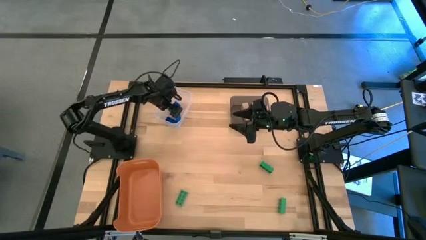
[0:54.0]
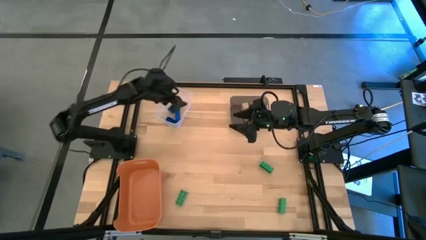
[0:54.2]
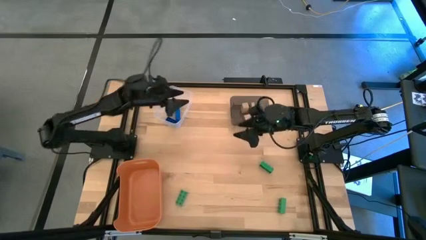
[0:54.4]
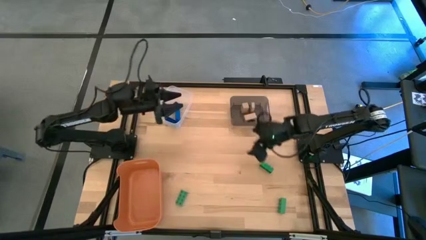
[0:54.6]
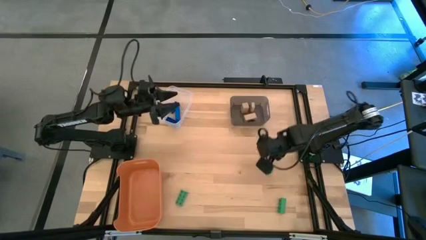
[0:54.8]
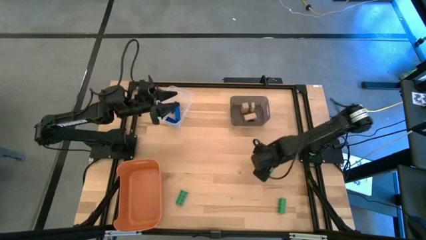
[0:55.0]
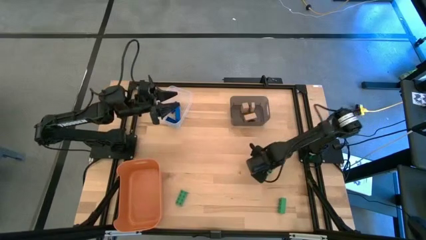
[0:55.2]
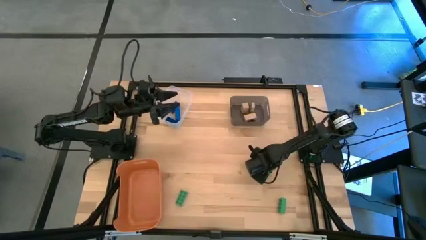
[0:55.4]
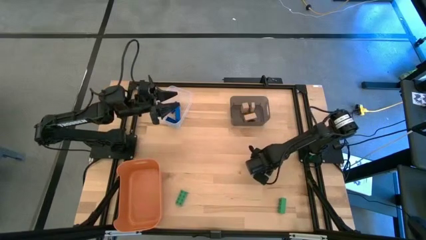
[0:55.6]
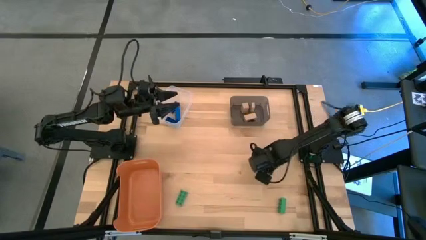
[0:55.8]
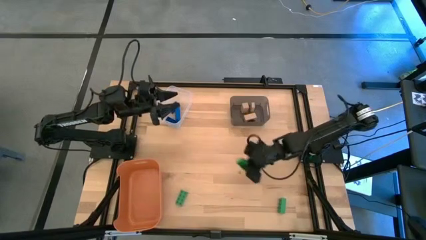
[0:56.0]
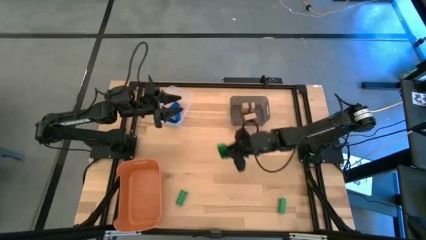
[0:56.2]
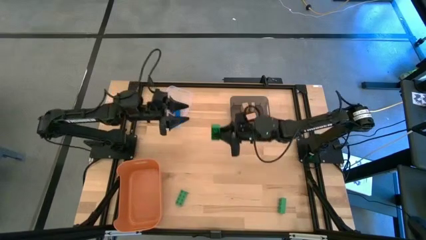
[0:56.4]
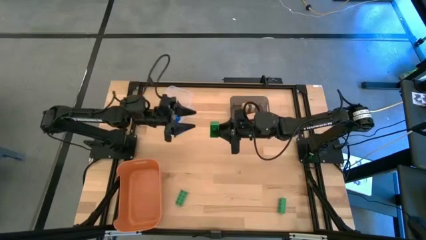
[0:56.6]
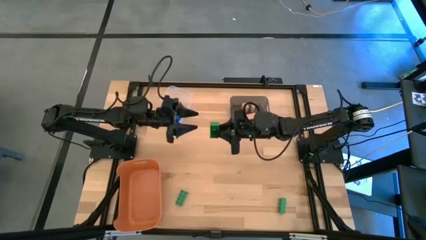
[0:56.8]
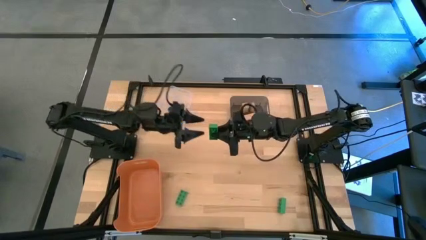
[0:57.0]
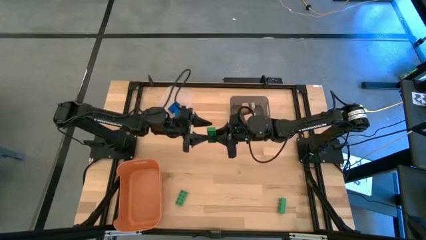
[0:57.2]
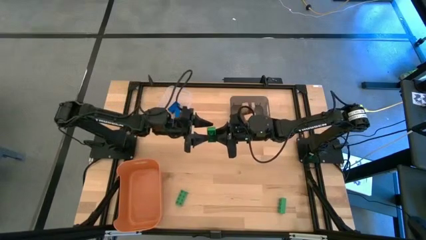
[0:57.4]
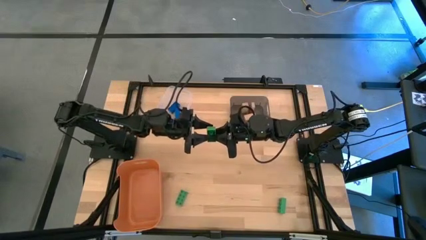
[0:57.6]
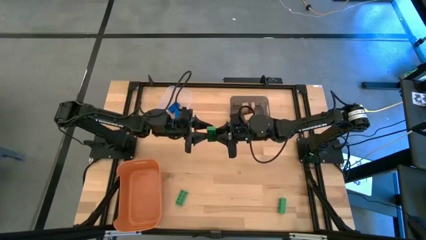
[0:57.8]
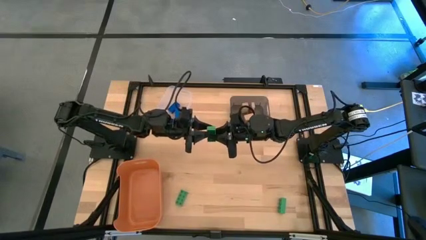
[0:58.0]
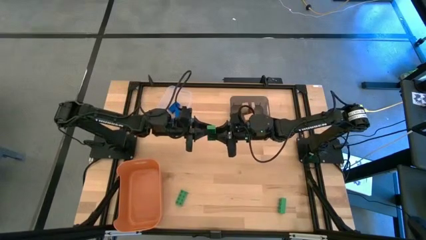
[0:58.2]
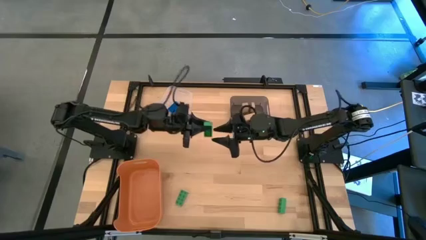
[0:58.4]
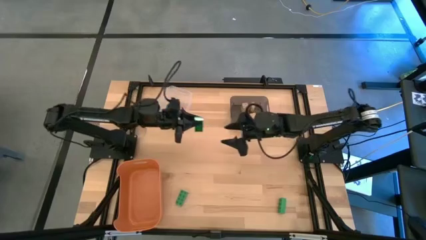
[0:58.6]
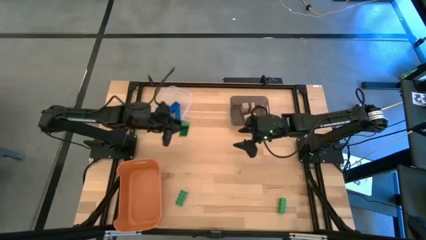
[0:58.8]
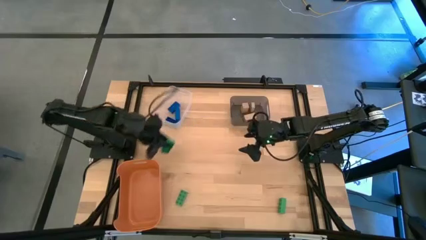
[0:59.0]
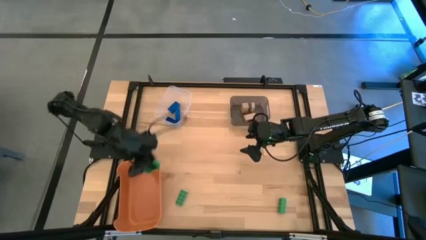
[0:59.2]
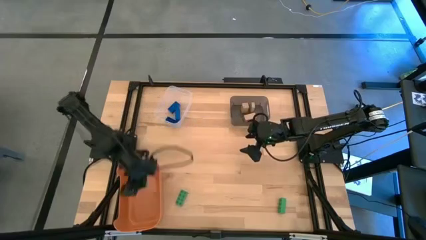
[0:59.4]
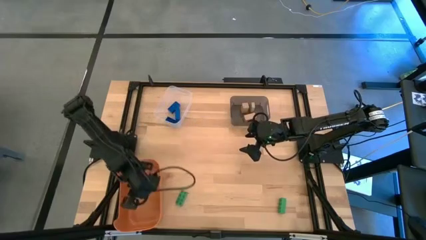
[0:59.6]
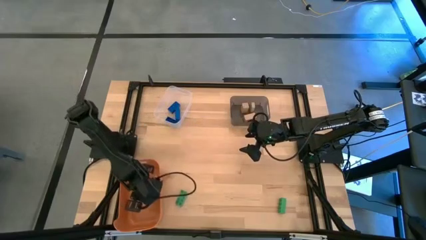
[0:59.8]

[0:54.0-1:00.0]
Task: Sort & place blocks by color
Put the top left green game piece into the orange bin

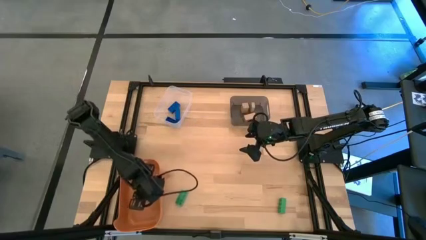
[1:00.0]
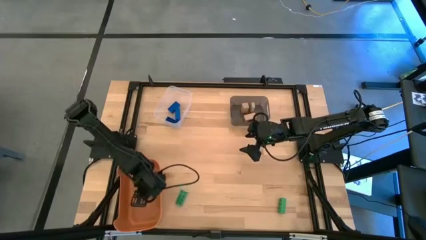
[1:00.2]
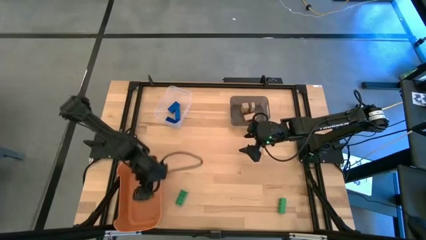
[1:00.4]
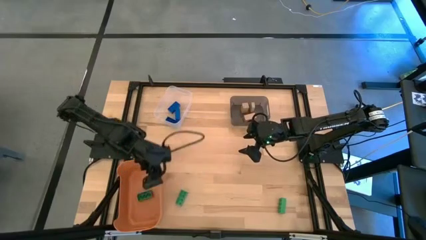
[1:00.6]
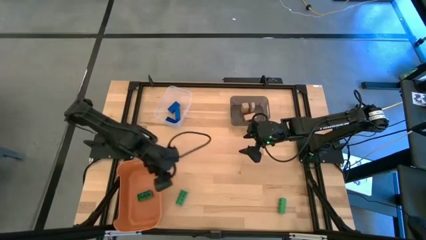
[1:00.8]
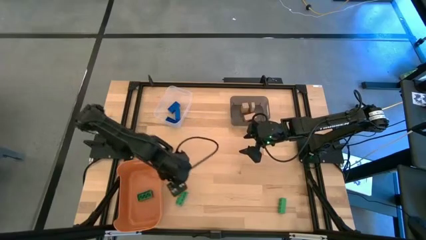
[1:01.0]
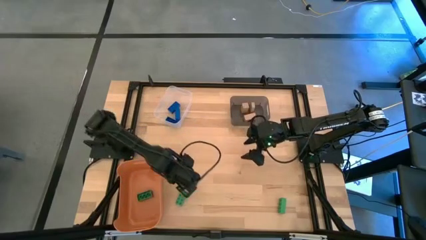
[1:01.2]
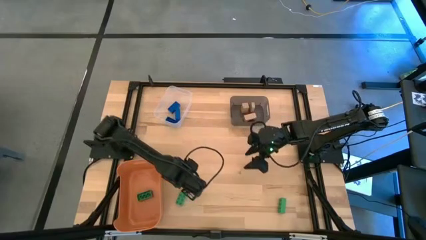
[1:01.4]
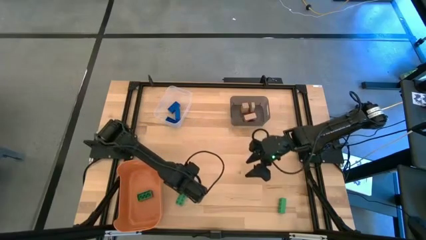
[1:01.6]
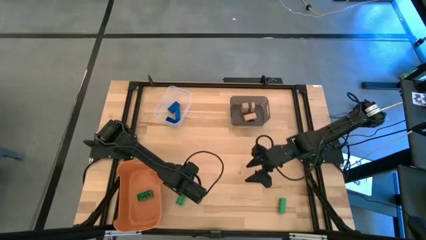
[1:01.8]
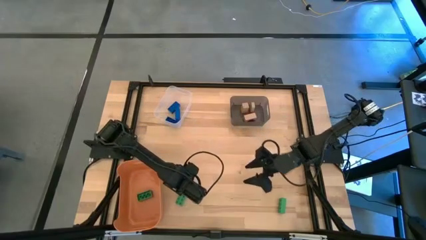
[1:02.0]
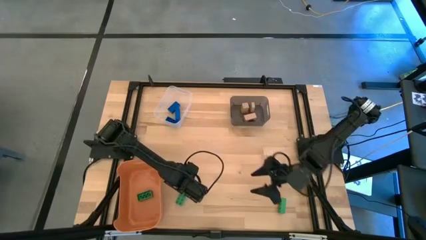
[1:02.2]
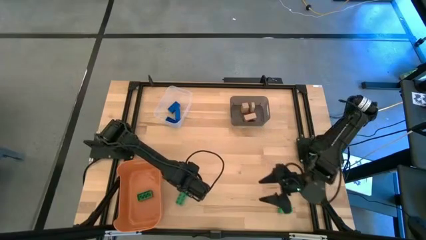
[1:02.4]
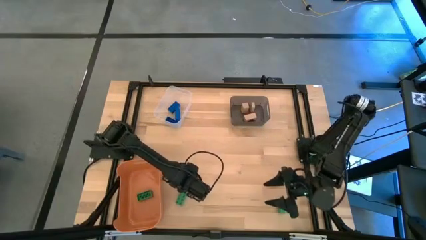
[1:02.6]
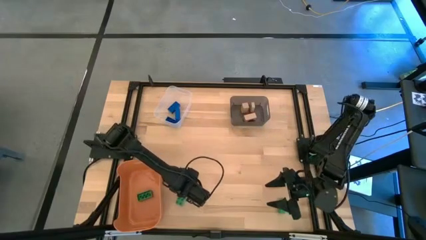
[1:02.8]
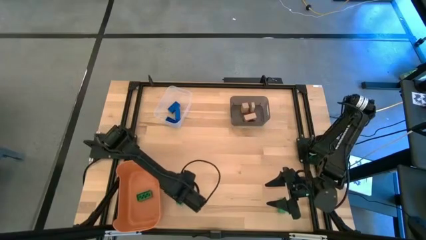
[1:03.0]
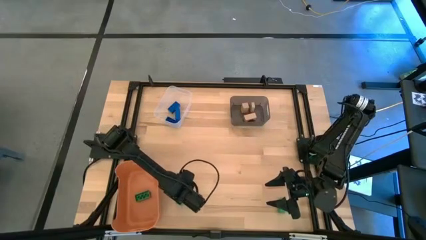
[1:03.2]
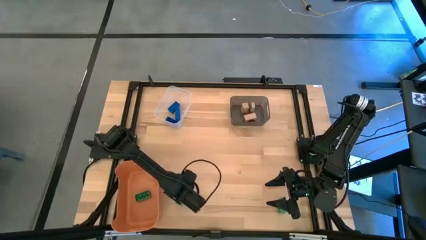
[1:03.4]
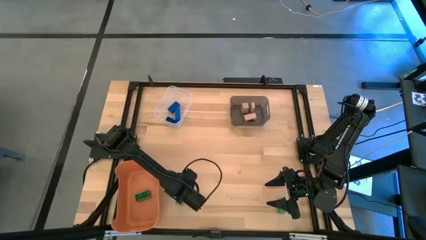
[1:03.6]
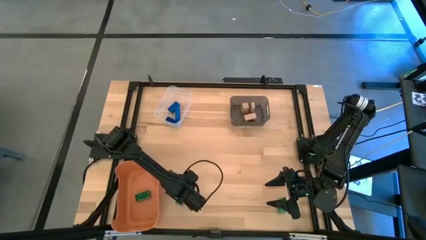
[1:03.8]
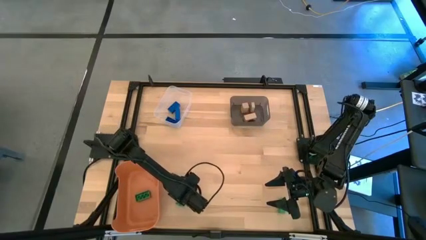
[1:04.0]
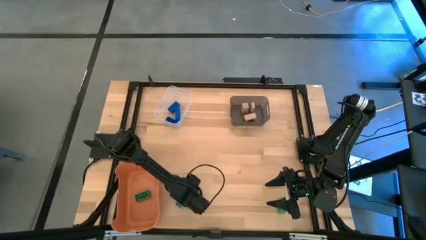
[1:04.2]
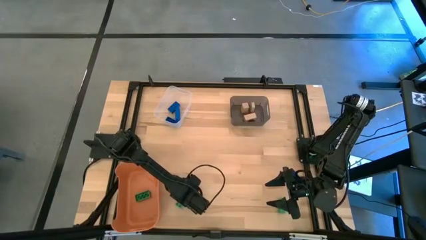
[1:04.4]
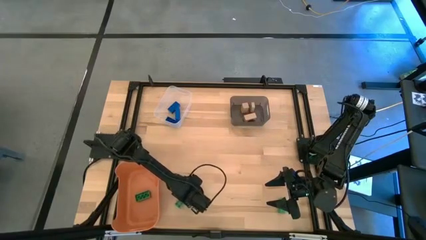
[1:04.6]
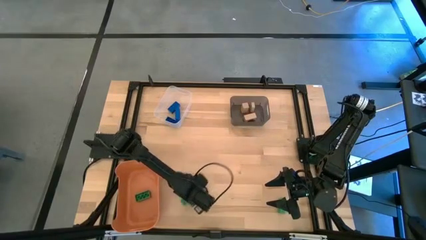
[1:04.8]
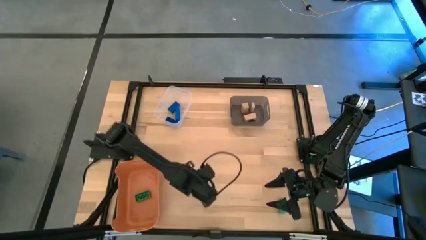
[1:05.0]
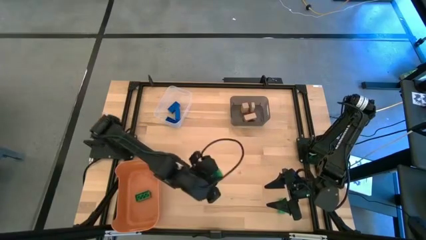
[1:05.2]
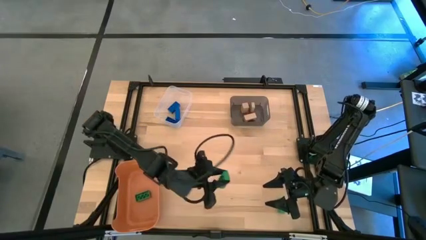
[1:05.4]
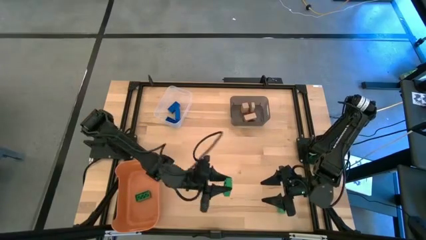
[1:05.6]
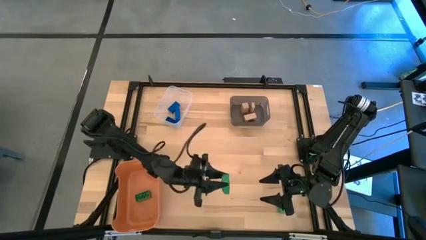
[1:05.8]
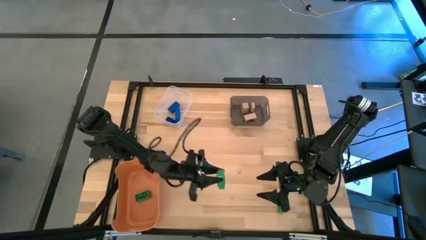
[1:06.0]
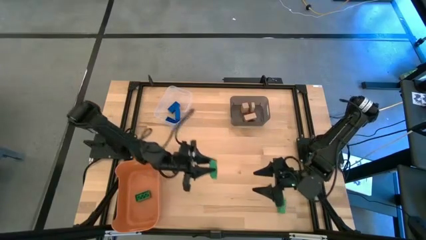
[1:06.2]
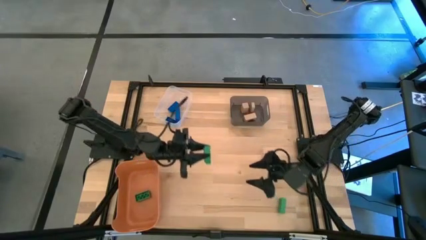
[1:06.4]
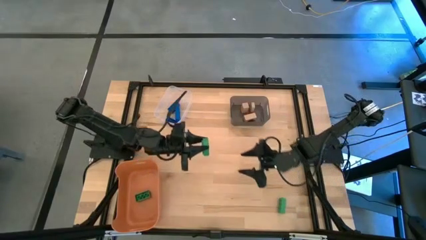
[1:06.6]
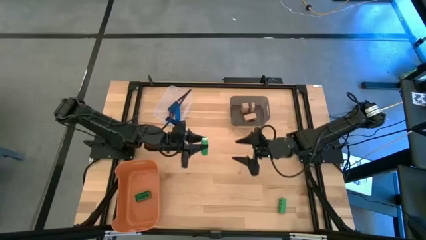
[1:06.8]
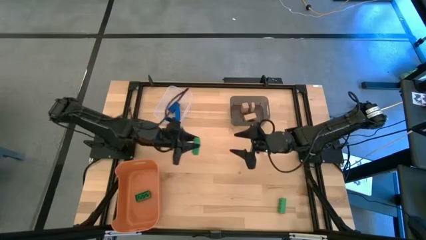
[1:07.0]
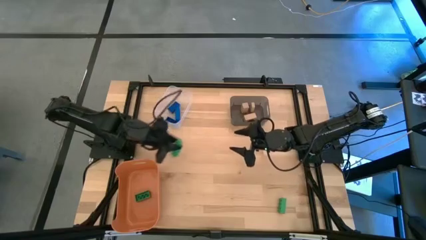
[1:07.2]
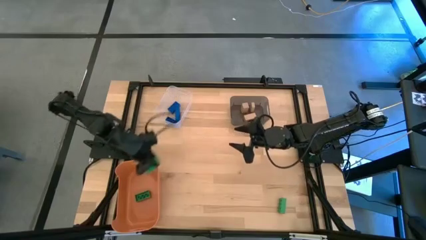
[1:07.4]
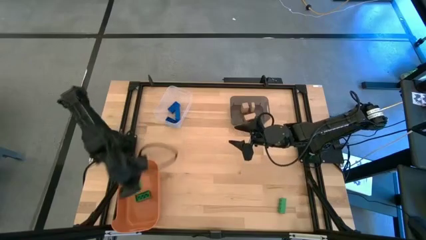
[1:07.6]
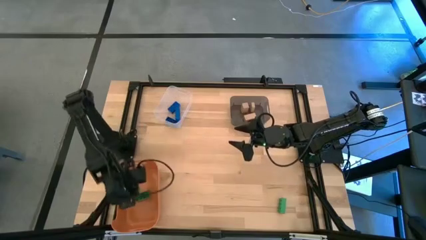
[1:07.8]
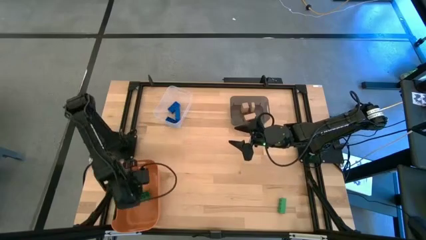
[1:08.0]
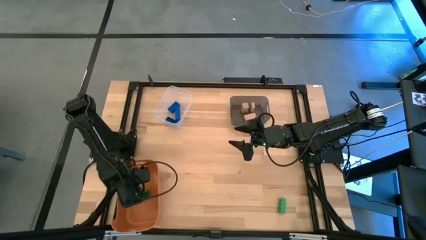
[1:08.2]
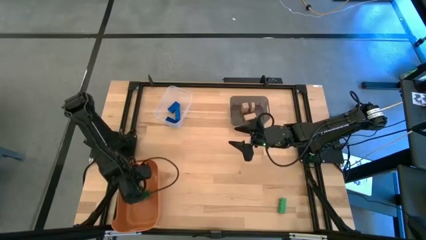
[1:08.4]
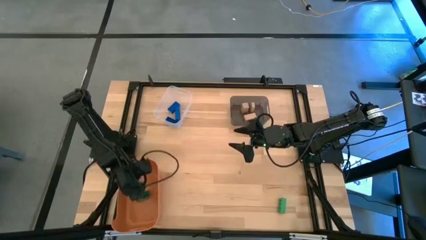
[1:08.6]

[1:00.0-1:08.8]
Put the left green game piece into the orange bin

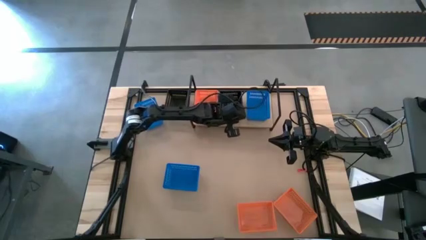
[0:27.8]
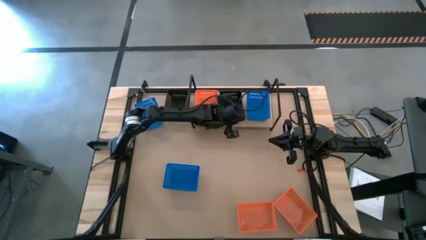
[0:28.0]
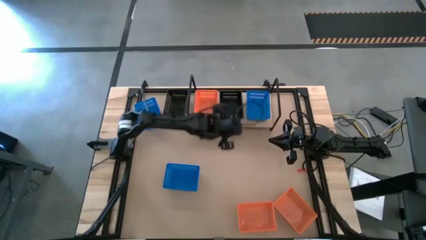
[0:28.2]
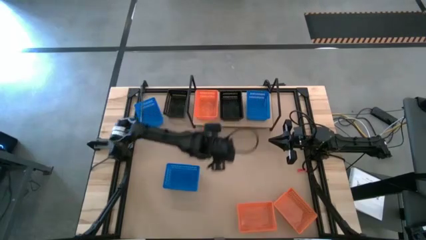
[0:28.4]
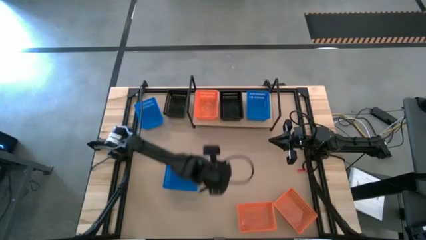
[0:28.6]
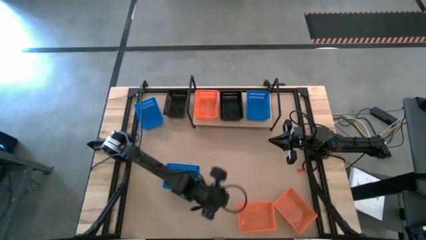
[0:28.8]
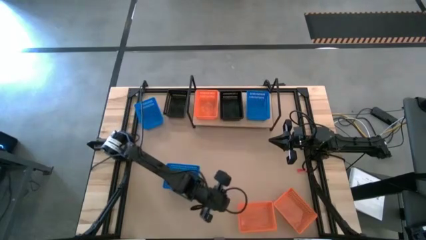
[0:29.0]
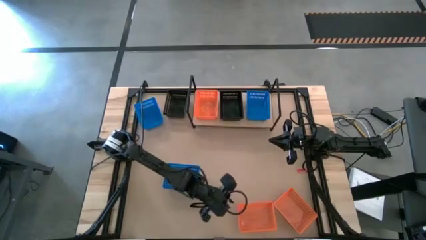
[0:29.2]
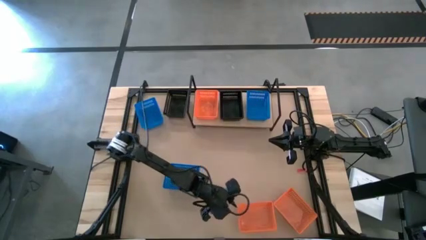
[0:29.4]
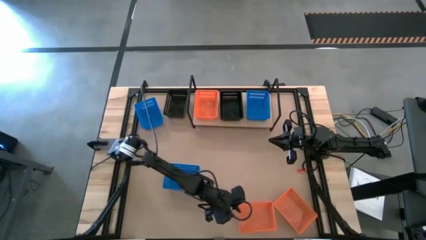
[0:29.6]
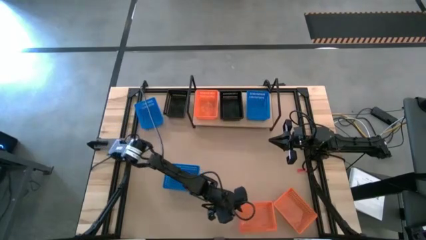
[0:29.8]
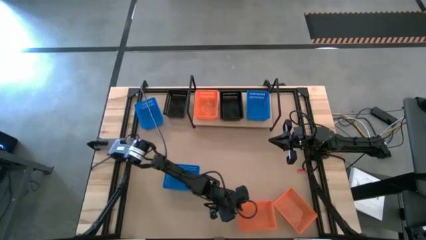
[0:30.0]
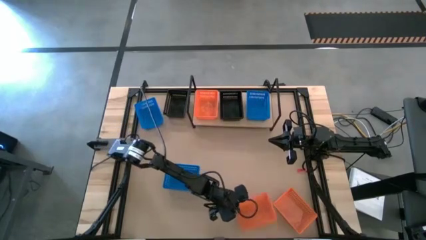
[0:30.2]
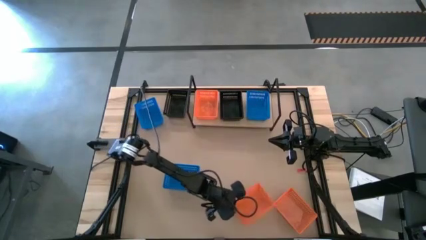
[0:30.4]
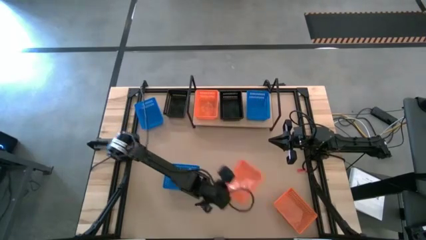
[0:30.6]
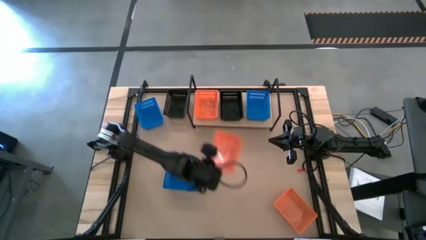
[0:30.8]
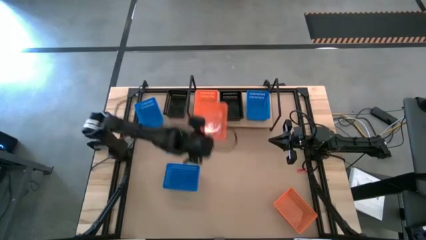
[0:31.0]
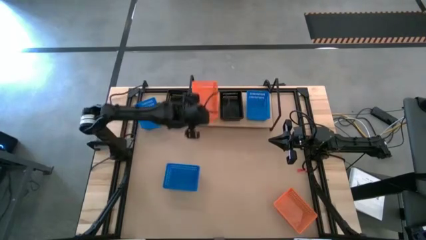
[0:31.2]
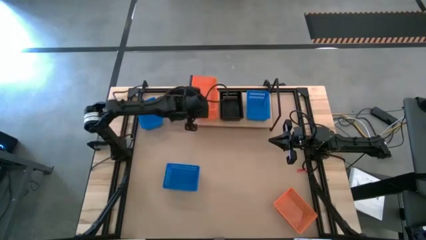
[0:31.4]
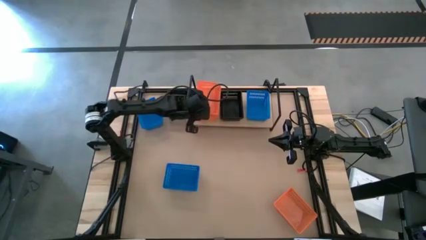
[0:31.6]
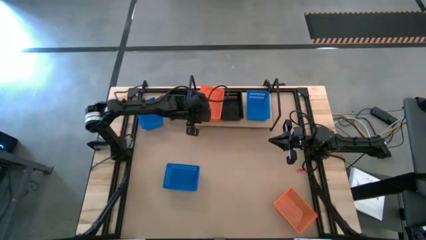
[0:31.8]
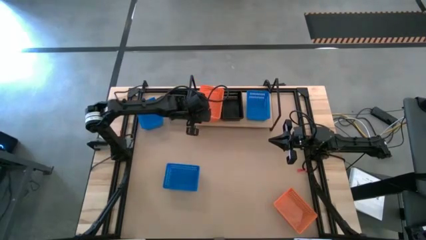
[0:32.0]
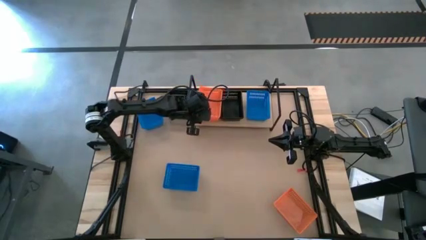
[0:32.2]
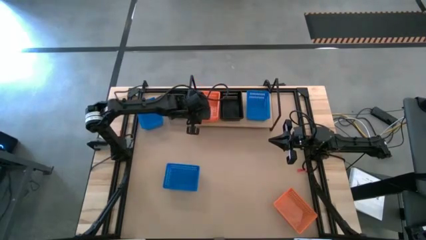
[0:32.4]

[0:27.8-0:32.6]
Task: Stack baskets on shelf by color
Stack the left orange bin on the orange bin on the shelf
